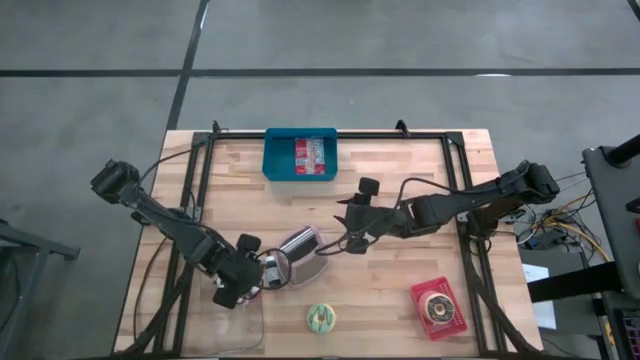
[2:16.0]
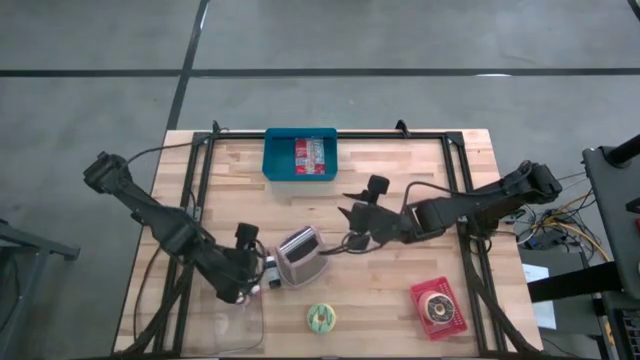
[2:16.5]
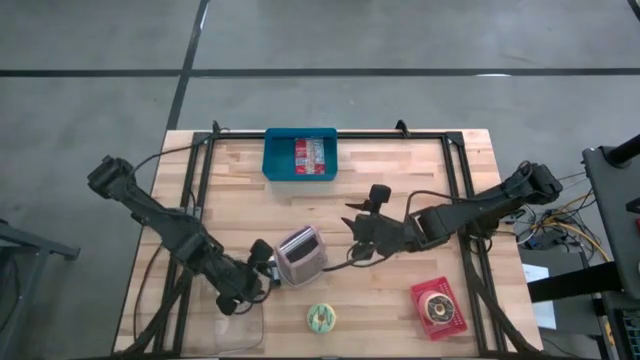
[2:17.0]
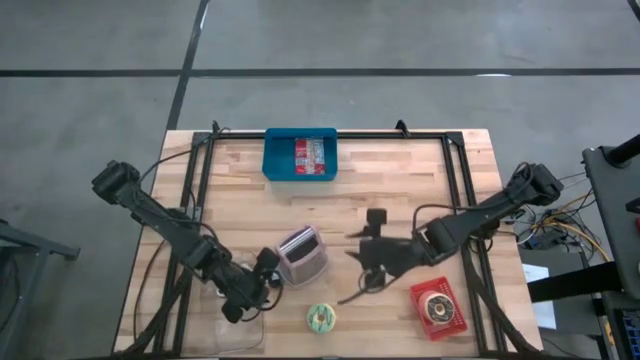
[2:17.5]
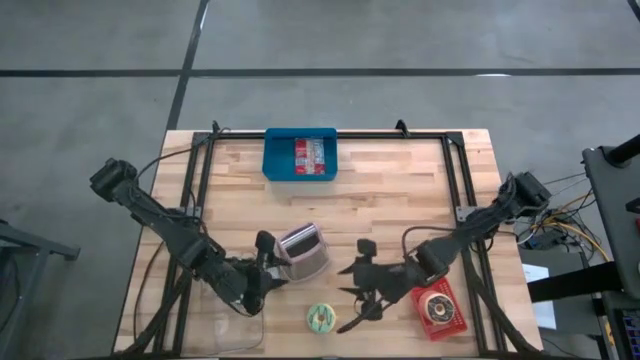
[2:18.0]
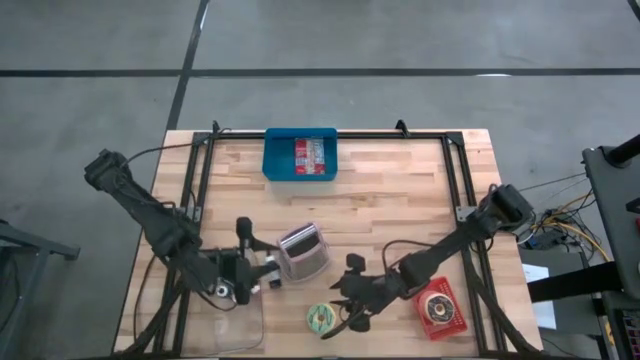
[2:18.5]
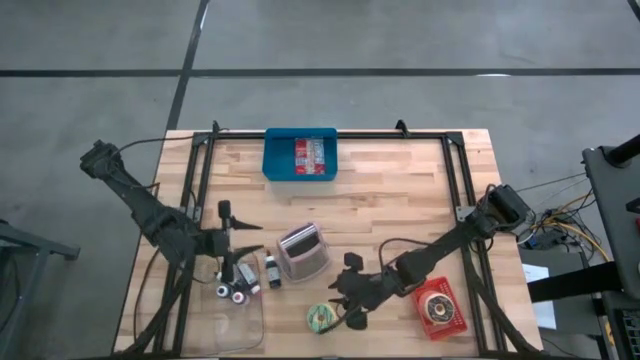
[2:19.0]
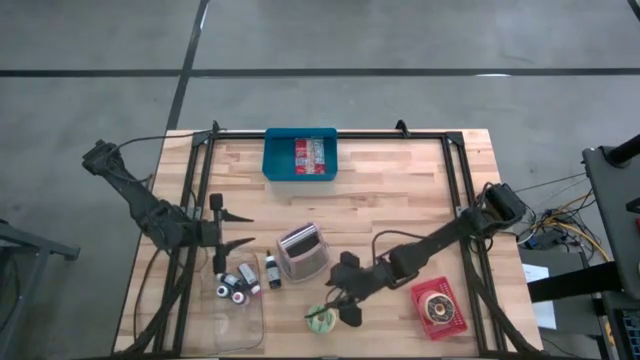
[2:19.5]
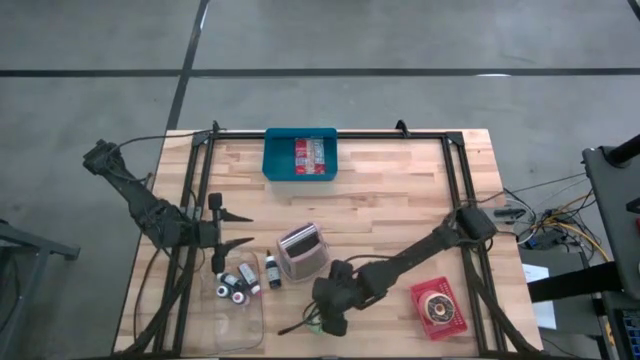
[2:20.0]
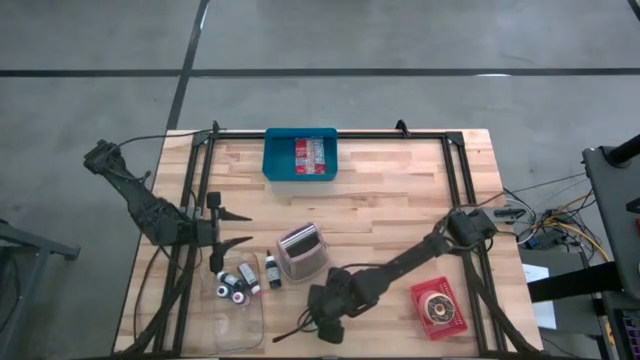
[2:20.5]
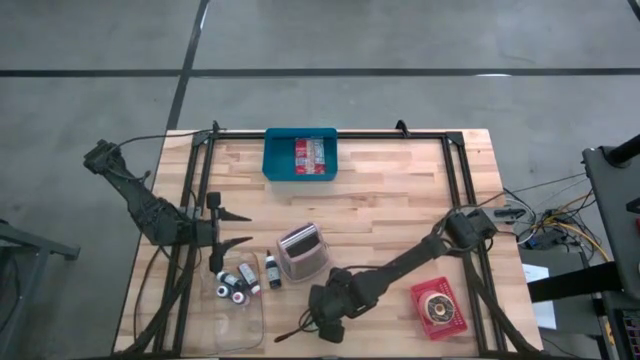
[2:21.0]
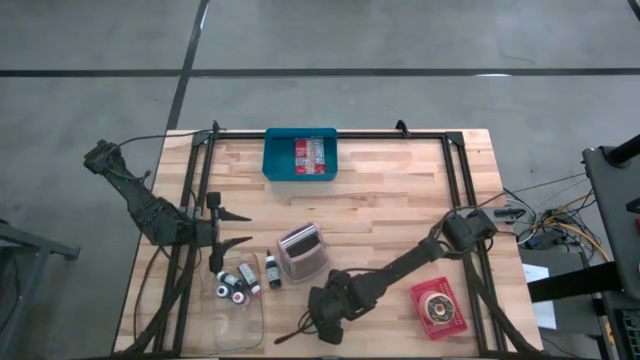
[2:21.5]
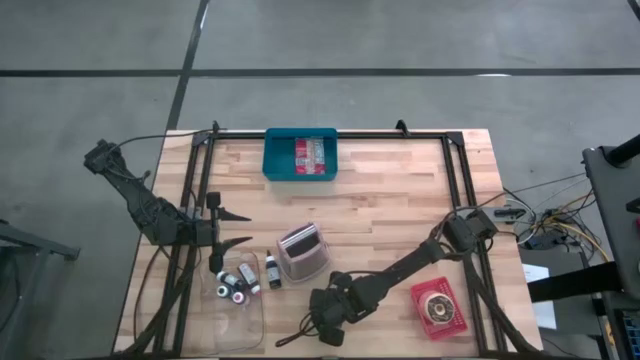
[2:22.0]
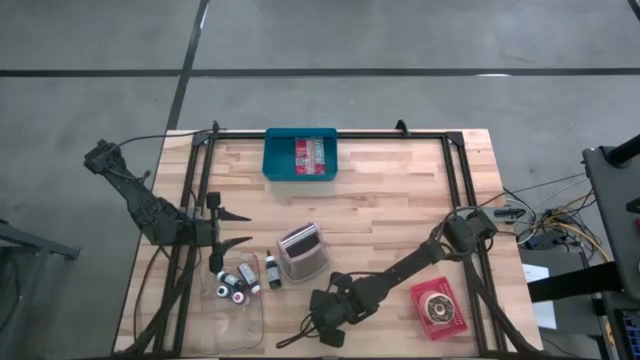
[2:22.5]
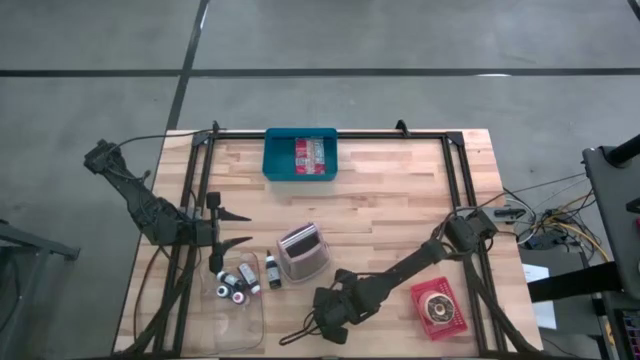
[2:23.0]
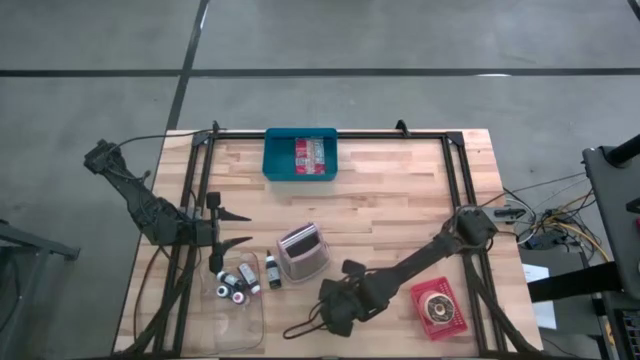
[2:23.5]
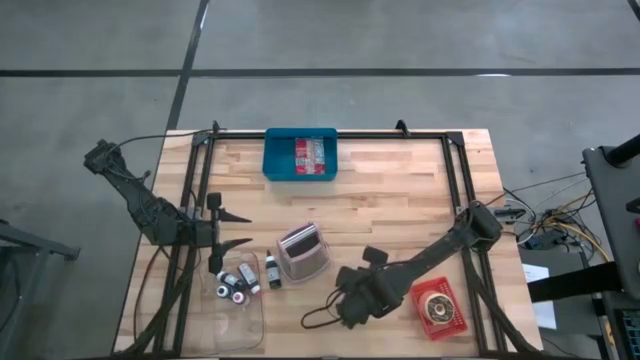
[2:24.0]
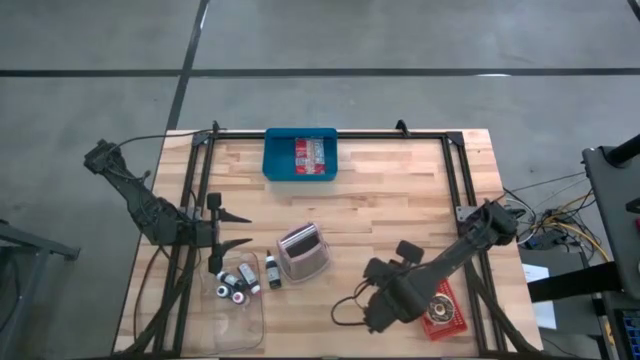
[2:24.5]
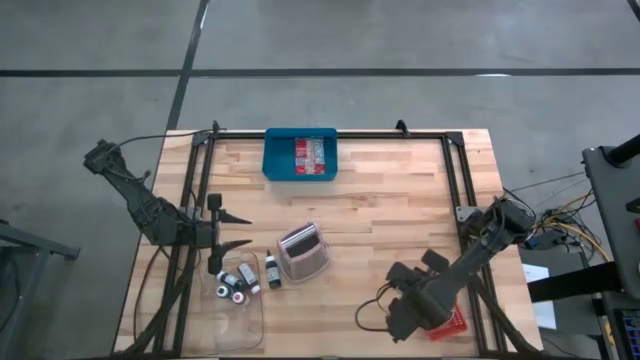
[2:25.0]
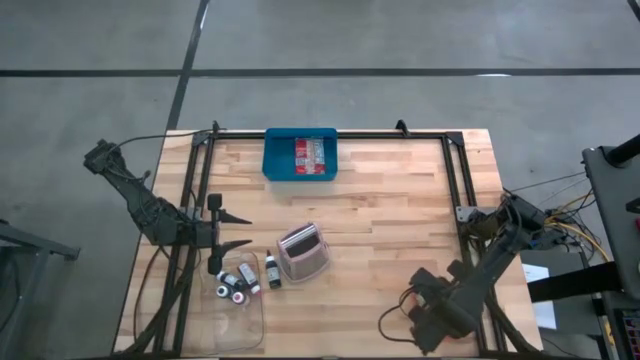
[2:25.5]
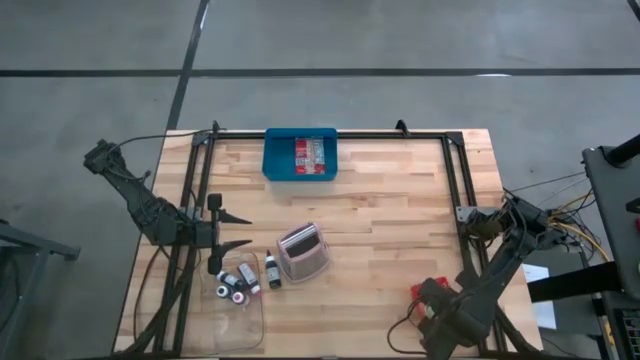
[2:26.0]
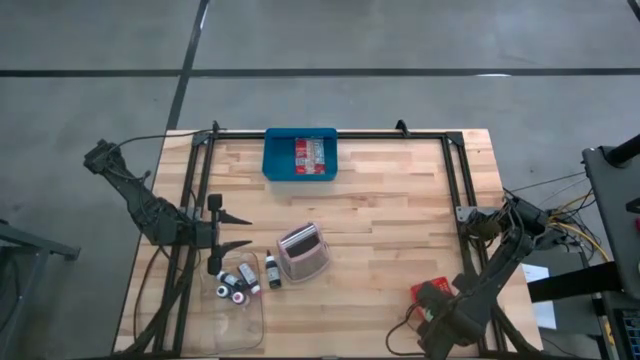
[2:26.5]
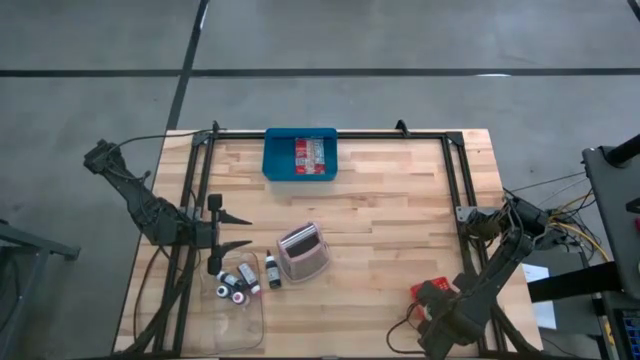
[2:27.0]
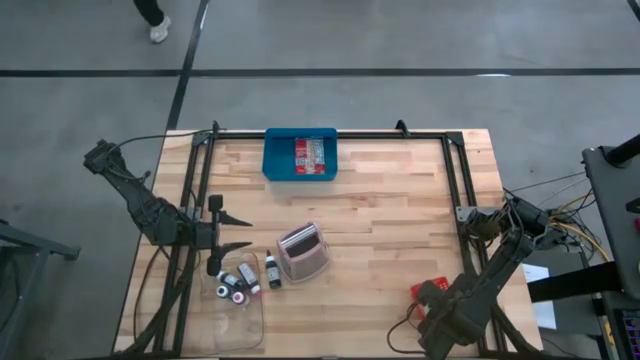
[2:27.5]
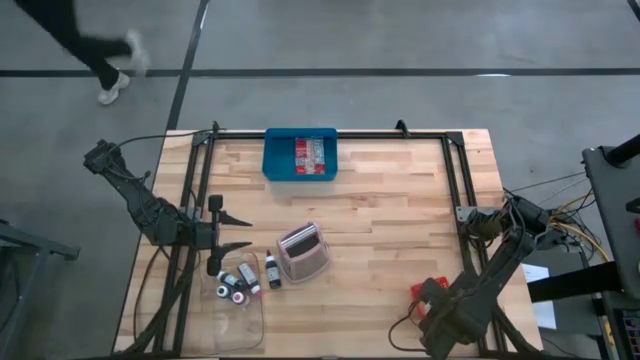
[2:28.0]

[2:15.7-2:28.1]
Task: Pick & Place Food Item
Put the green donut into the red bin

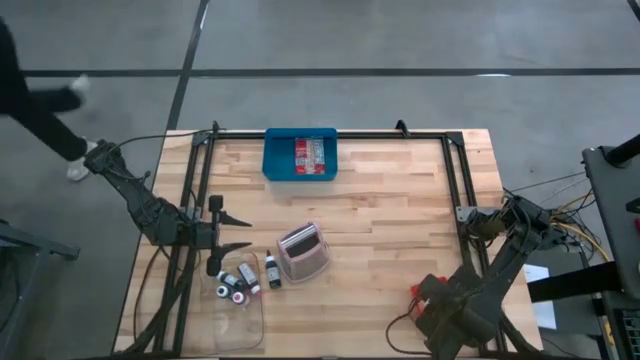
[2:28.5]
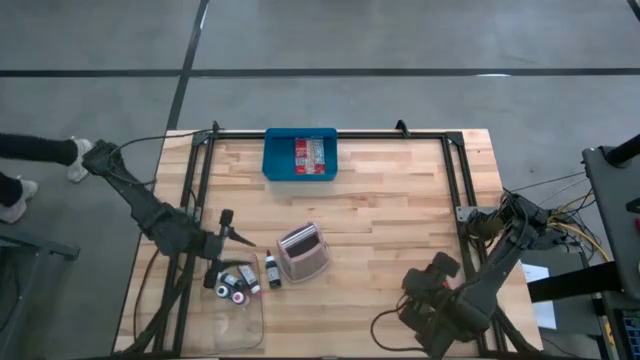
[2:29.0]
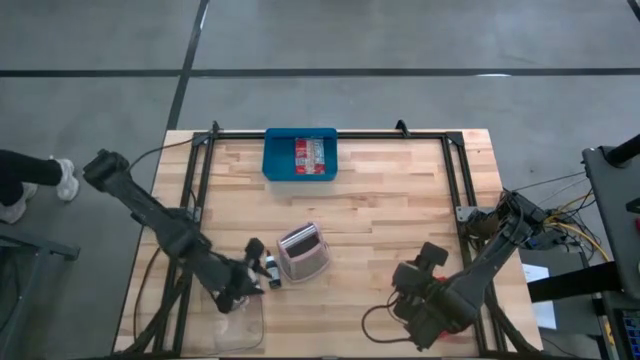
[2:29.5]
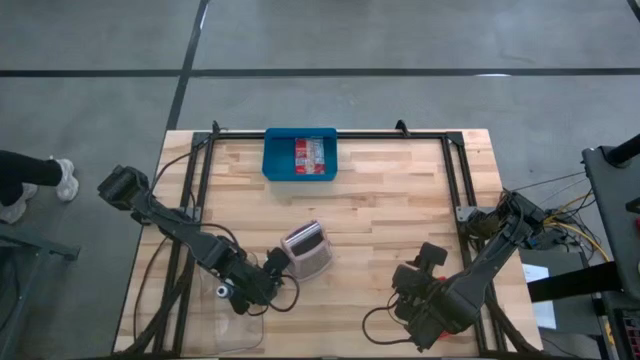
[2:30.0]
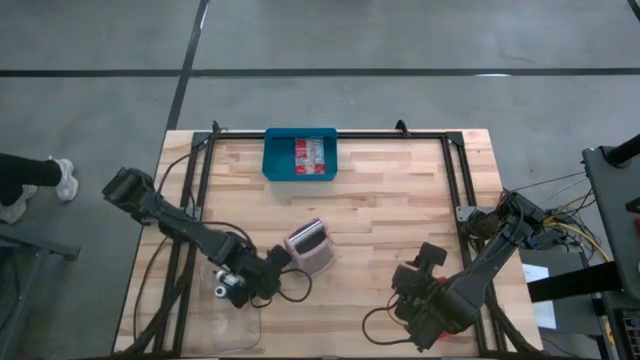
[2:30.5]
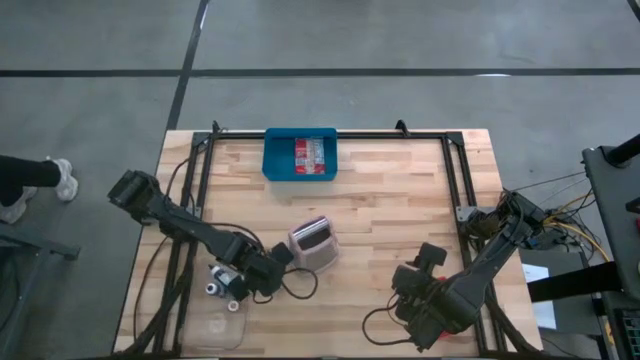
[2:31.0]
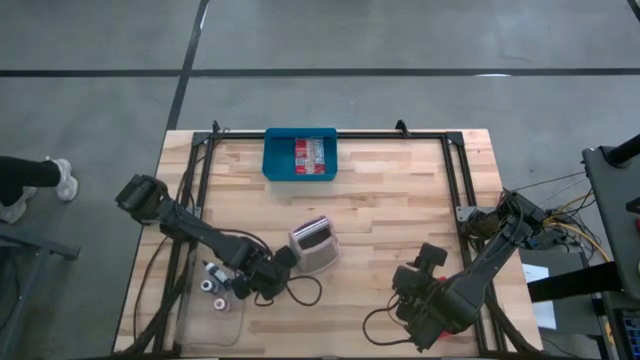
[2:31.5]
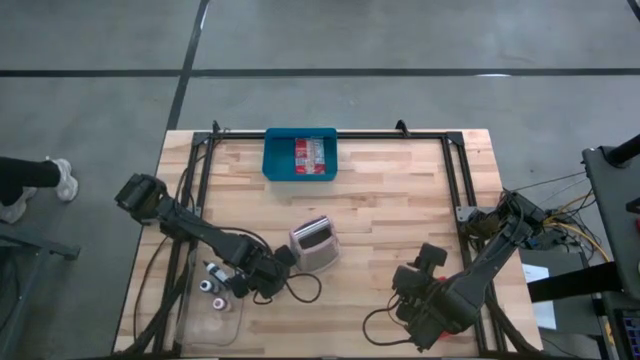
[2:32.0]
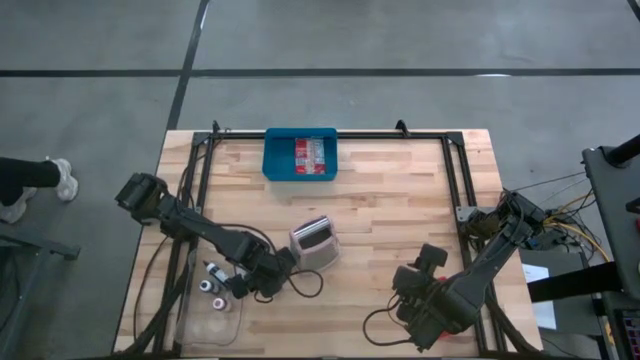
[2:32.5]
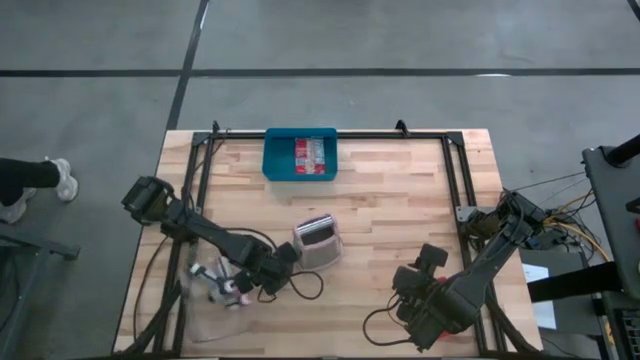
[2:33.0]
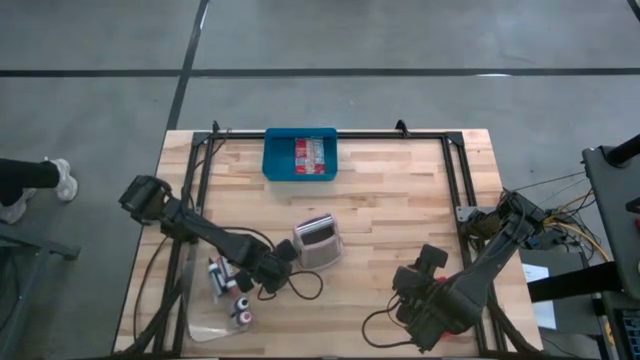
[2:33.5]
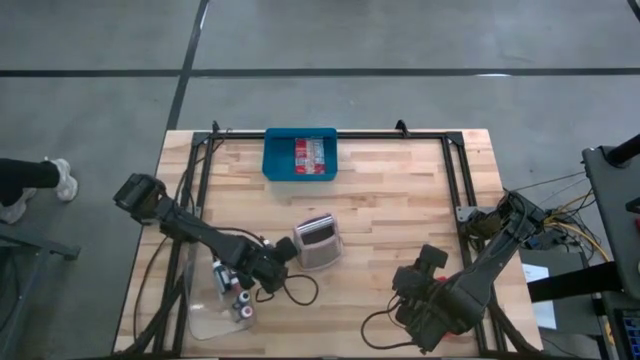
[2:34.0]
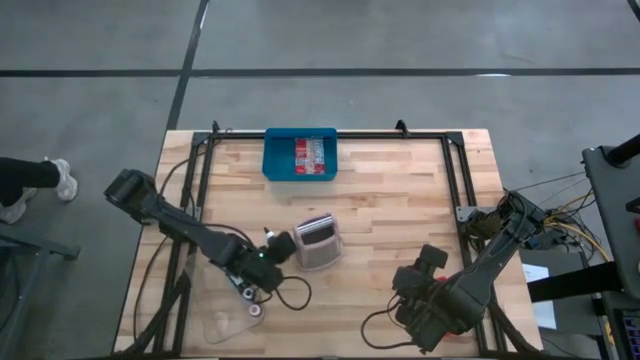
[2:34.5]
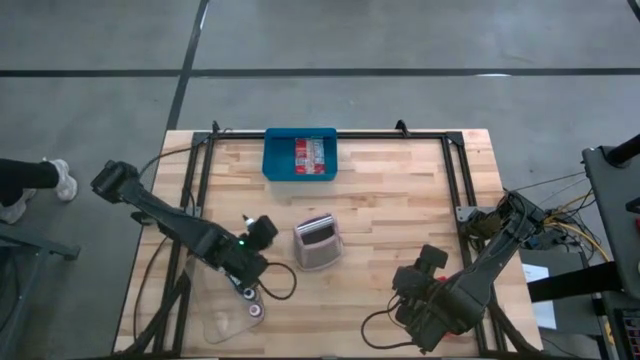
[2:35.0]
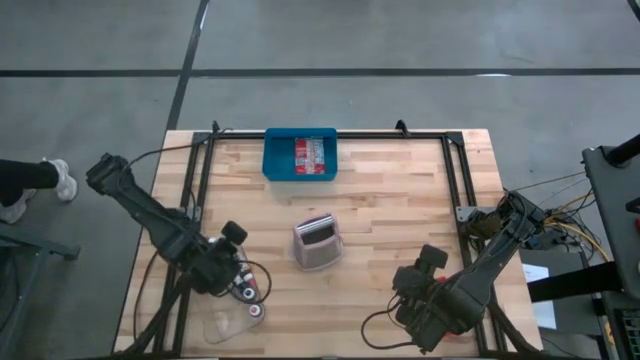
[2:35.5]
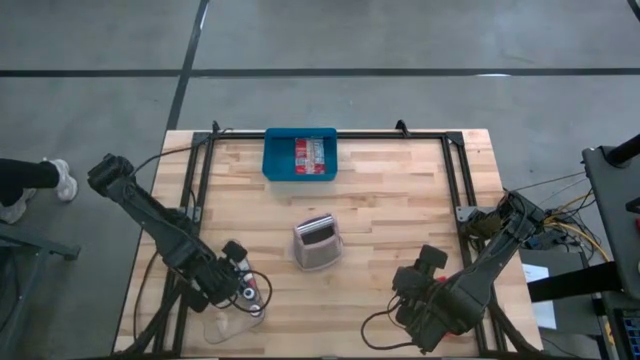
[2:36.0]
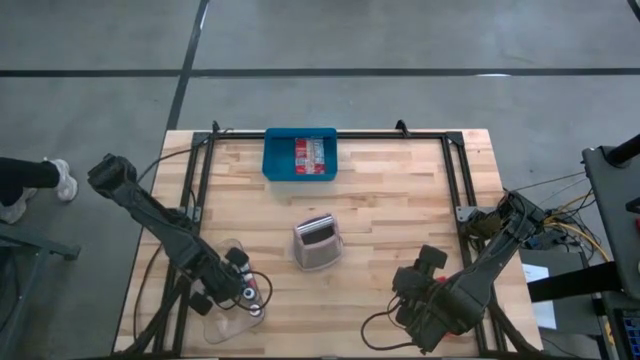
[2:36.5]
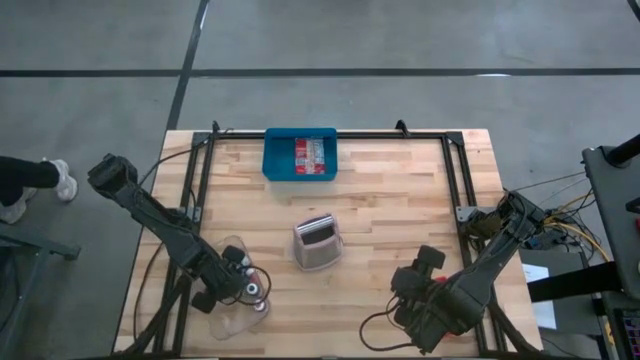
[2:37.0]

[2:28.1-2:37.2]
Put the black food coloring bottle into the transparent bin
